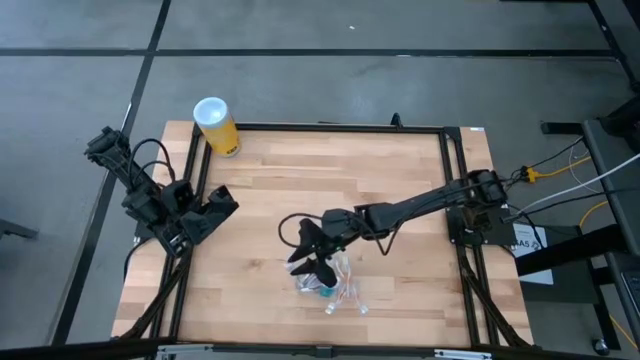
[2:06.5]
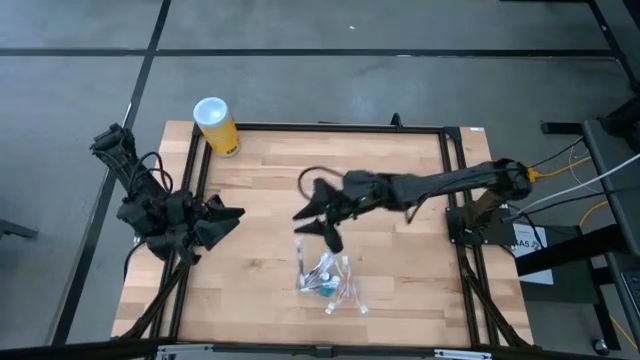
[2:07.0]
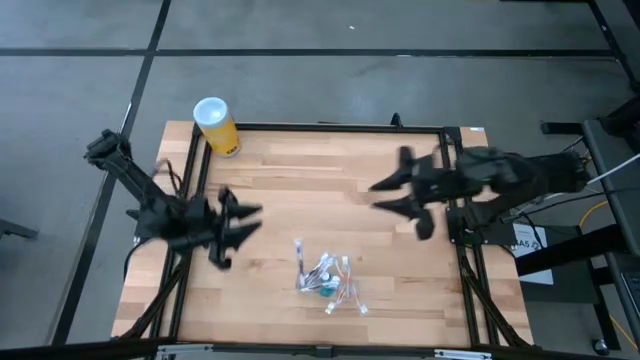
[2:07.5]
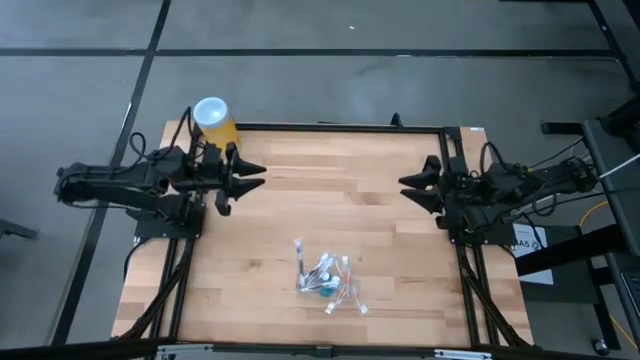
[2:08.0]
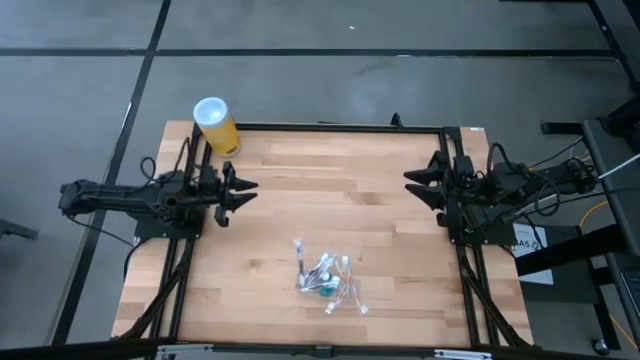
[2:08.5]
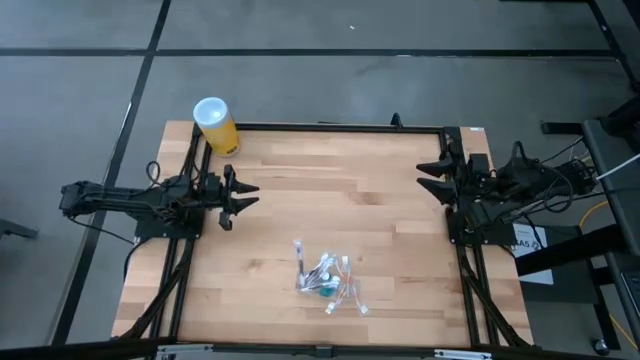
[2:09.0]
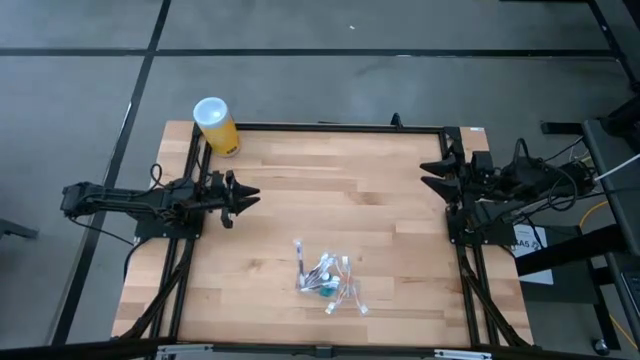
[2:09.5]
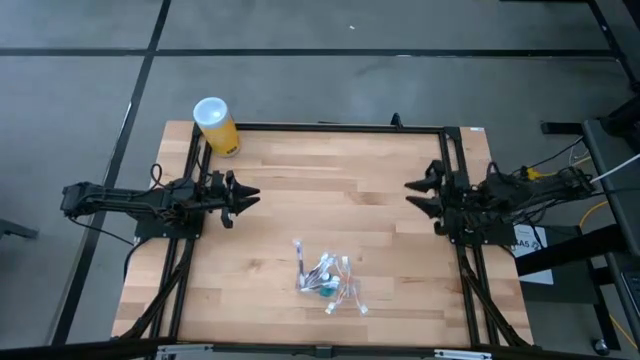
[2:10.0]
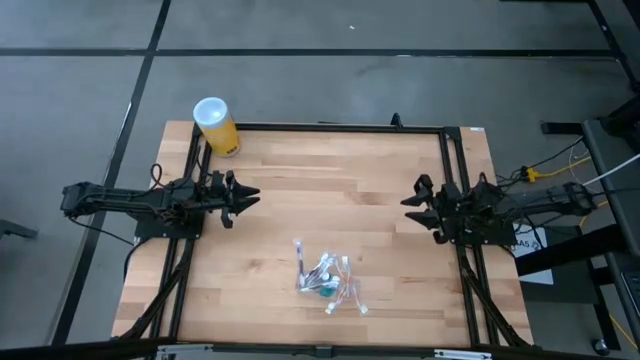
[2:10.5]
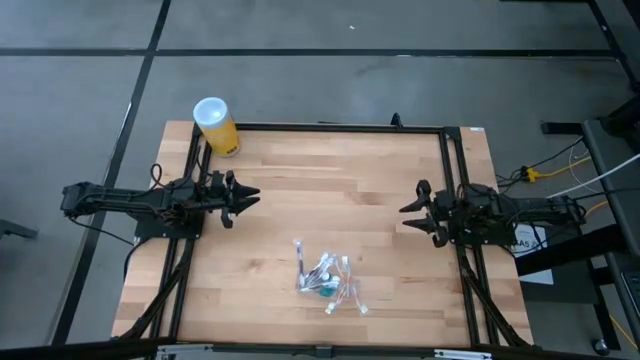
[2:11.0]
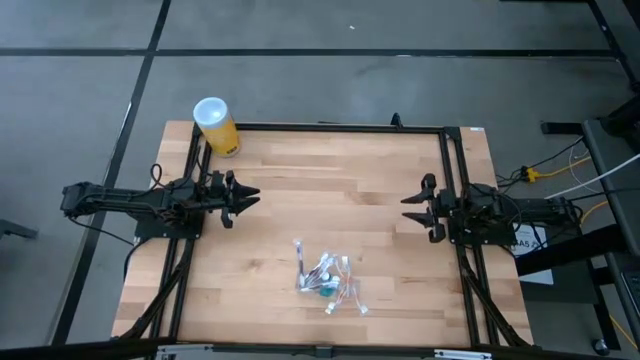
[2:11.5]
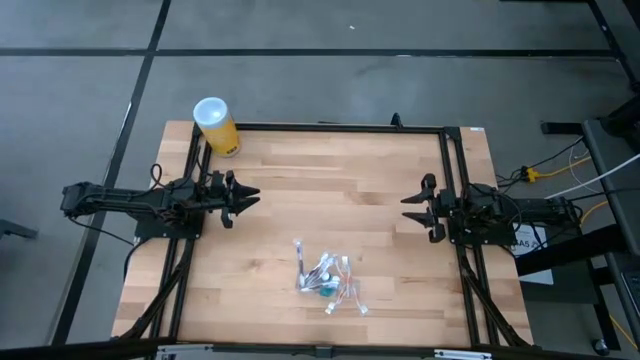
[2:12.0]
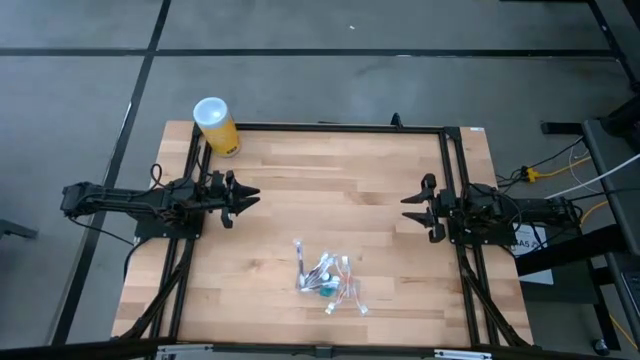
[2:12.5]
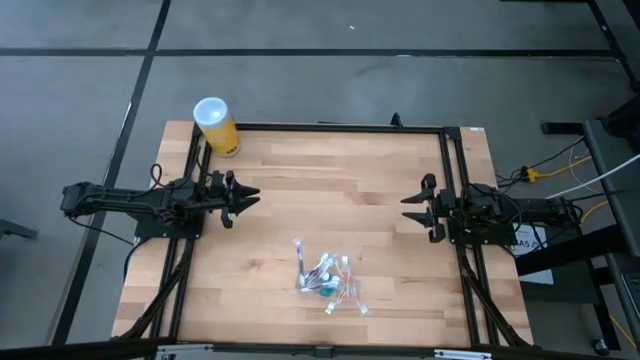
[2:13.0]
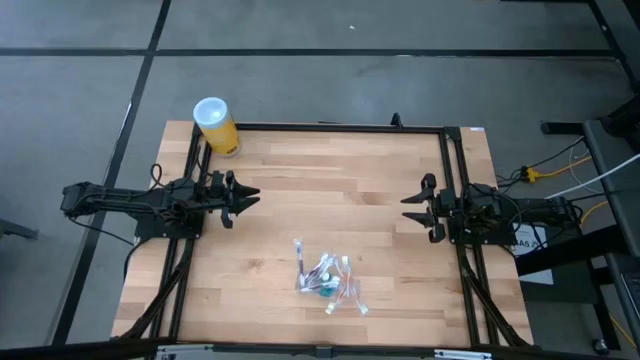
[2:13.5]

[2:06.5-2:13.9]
Task: Pick & Place toothbrushing station
Return to Home Position

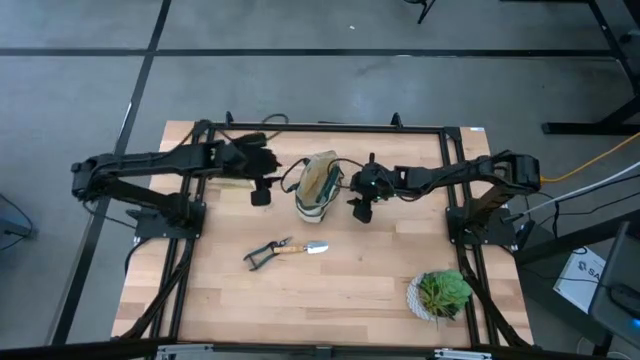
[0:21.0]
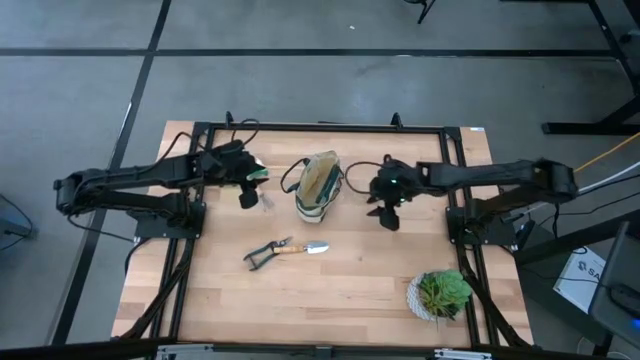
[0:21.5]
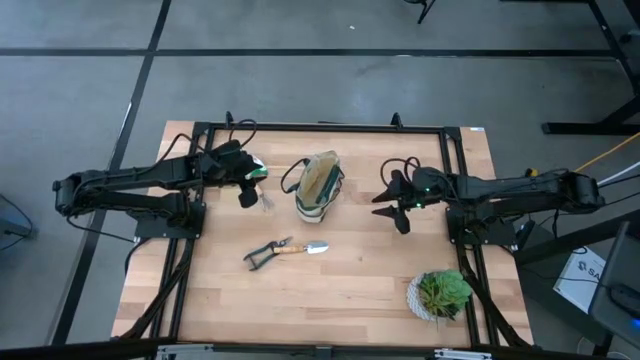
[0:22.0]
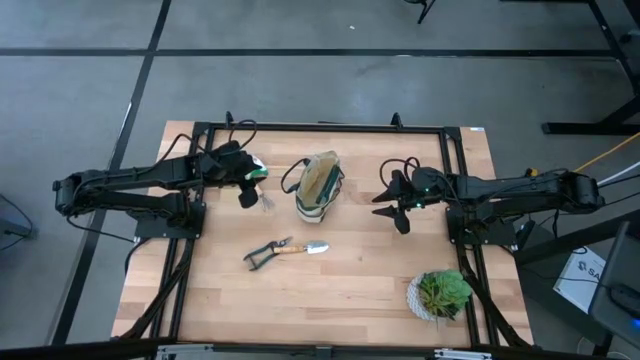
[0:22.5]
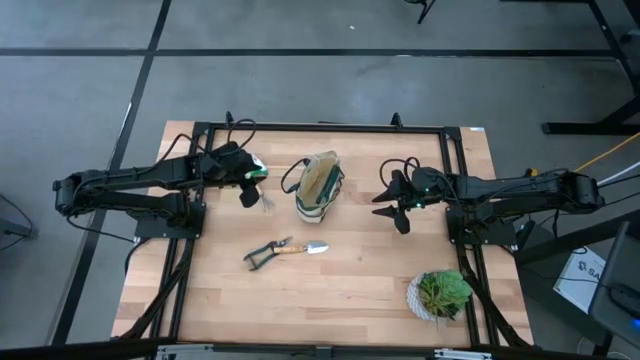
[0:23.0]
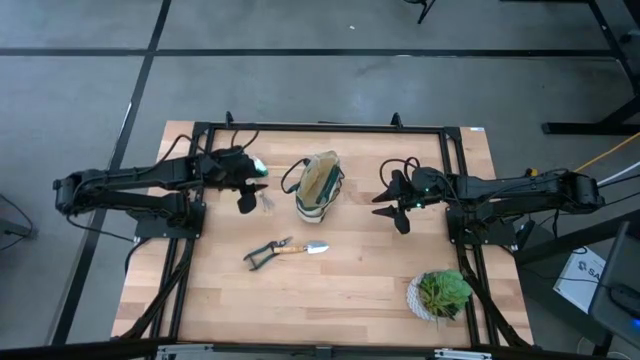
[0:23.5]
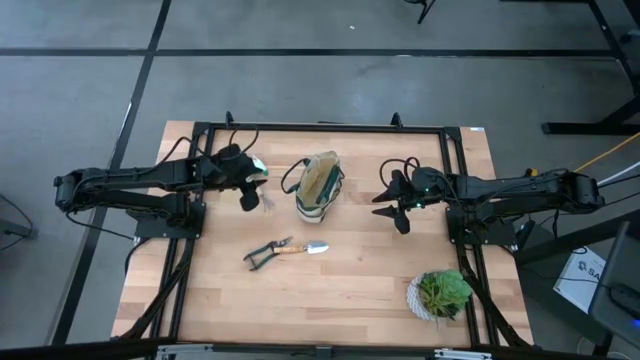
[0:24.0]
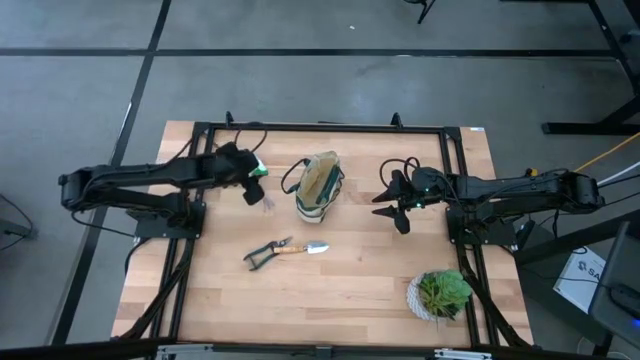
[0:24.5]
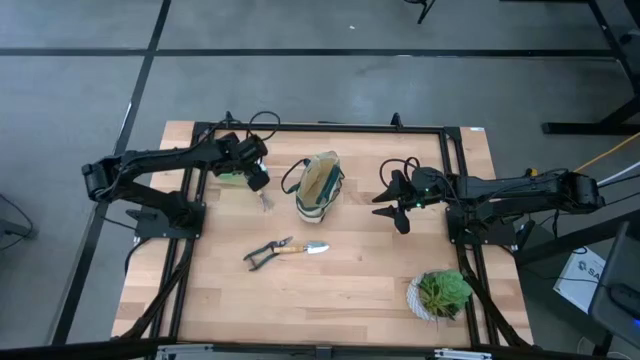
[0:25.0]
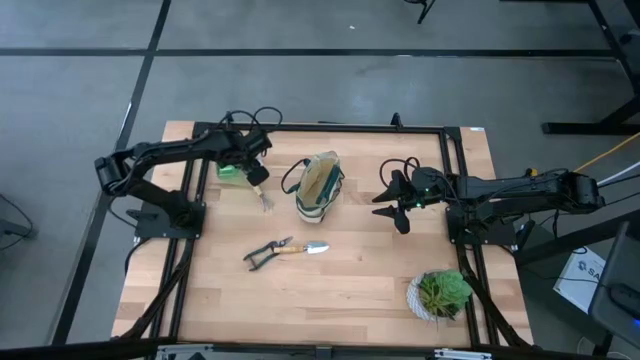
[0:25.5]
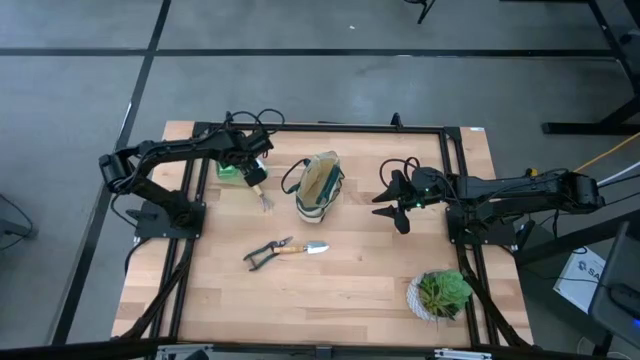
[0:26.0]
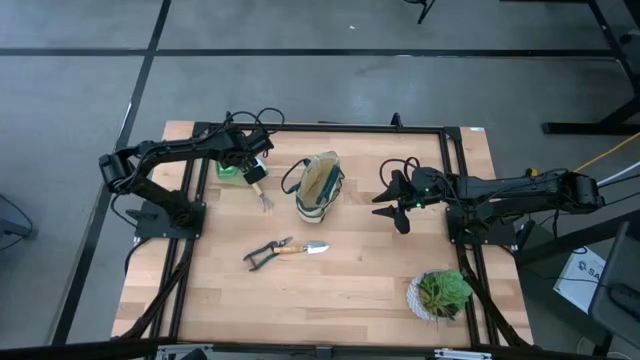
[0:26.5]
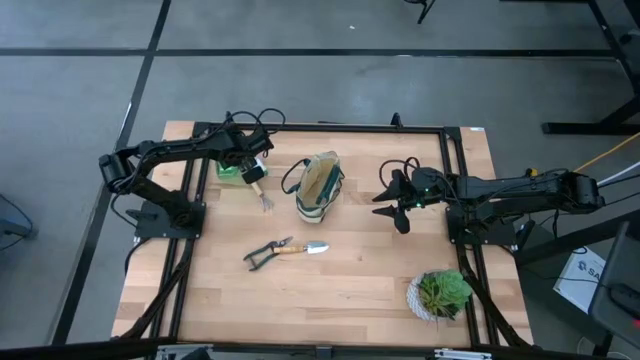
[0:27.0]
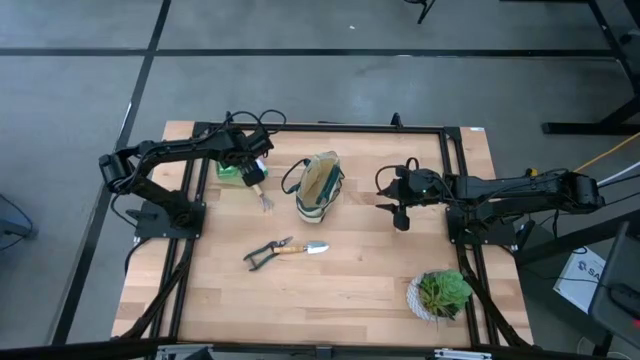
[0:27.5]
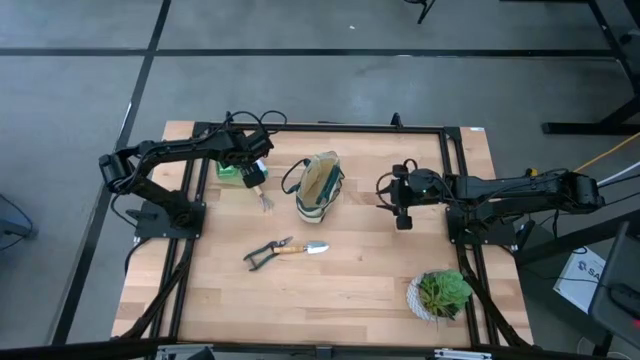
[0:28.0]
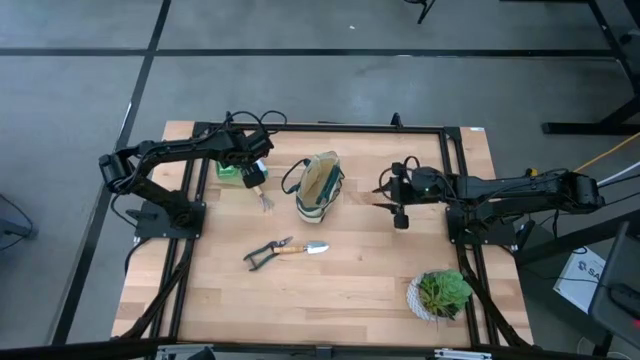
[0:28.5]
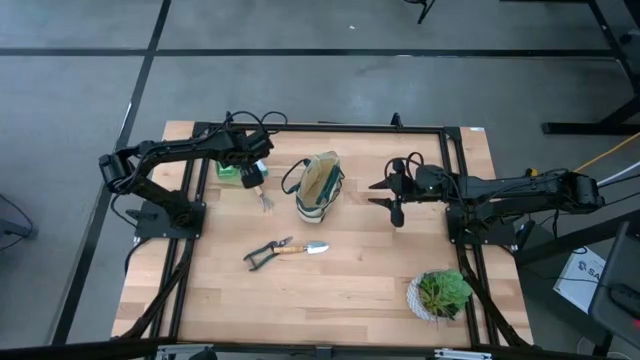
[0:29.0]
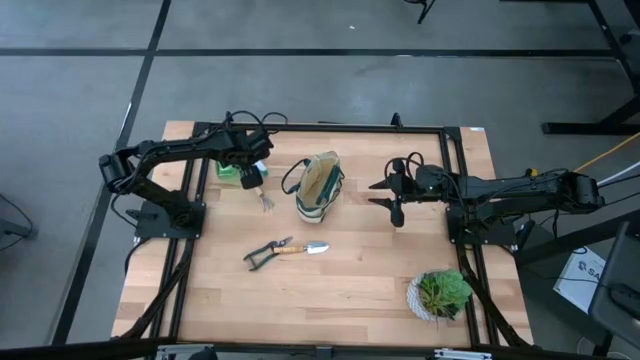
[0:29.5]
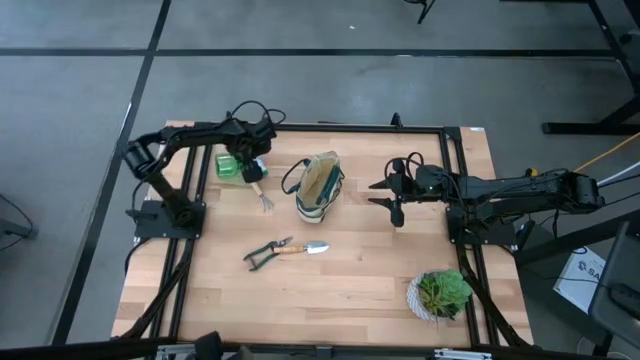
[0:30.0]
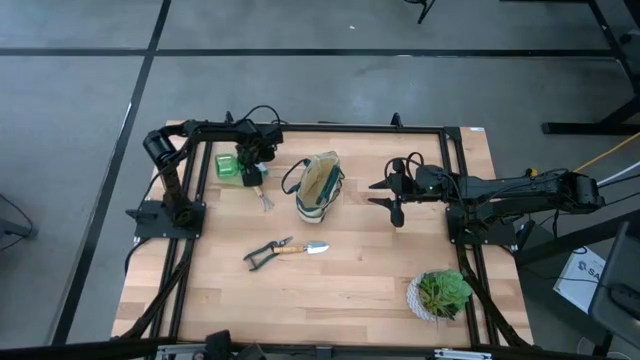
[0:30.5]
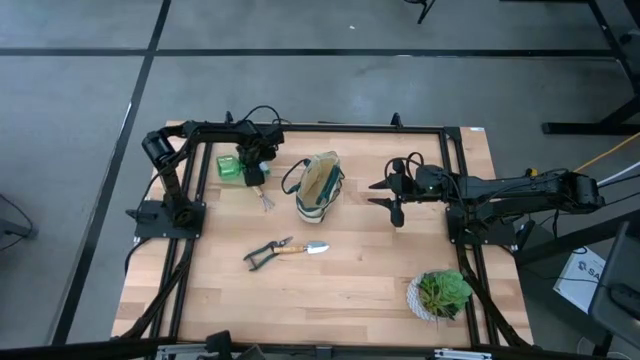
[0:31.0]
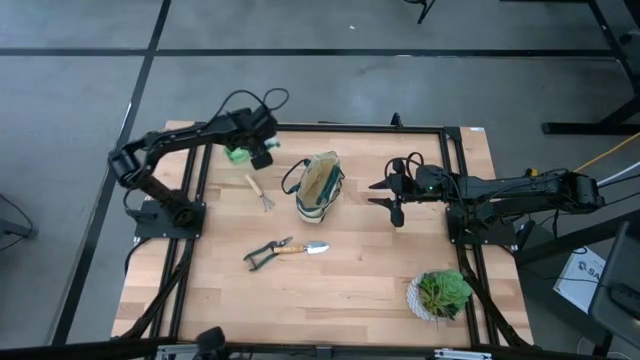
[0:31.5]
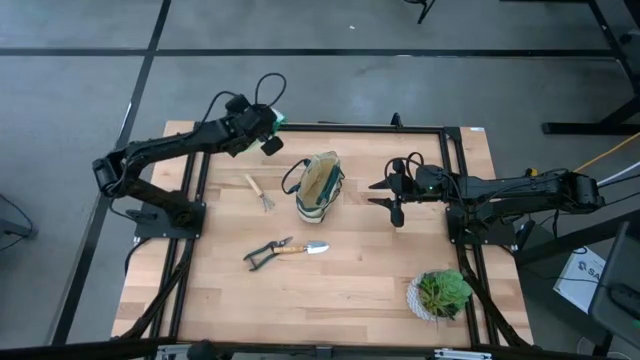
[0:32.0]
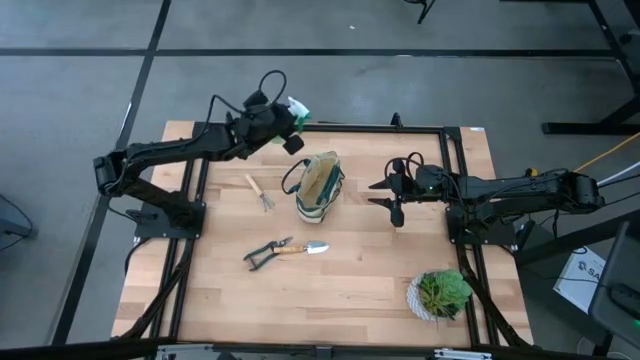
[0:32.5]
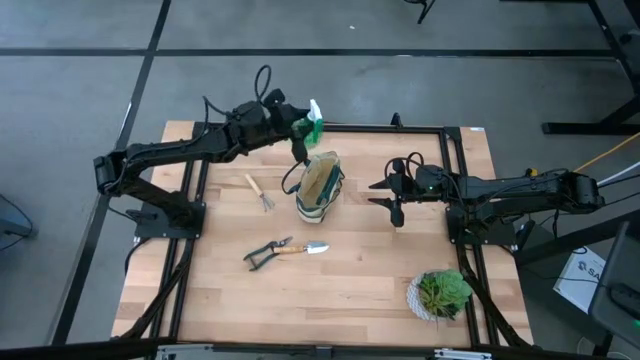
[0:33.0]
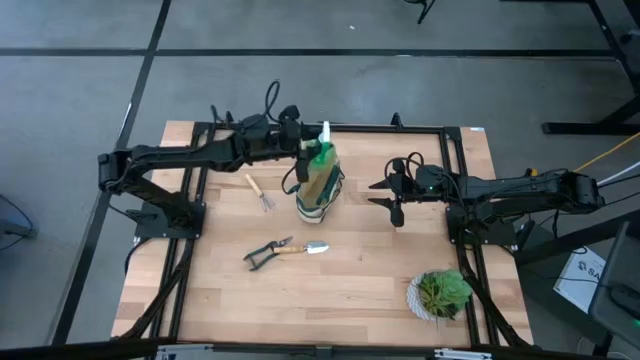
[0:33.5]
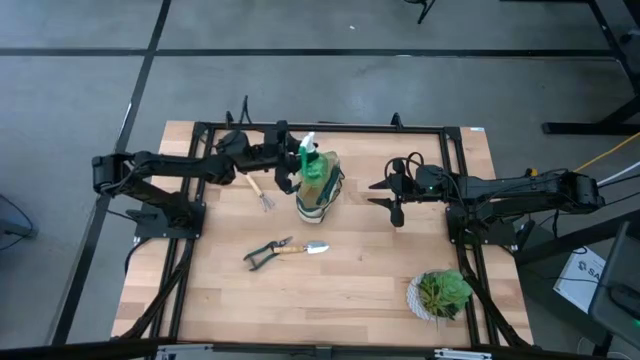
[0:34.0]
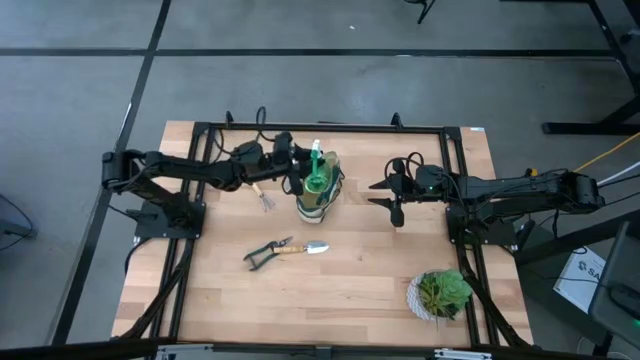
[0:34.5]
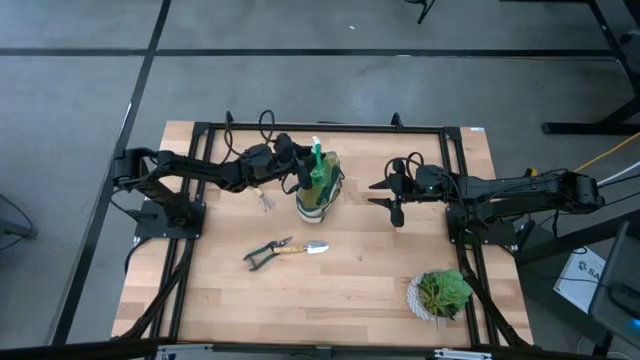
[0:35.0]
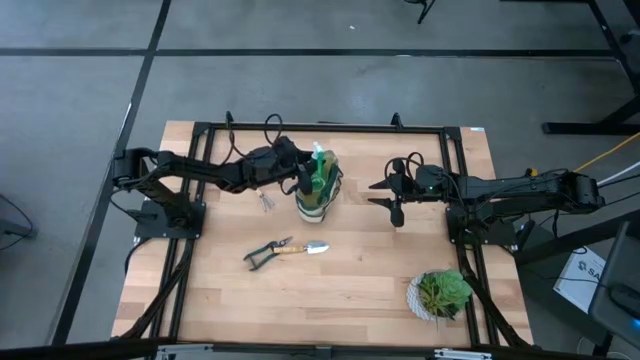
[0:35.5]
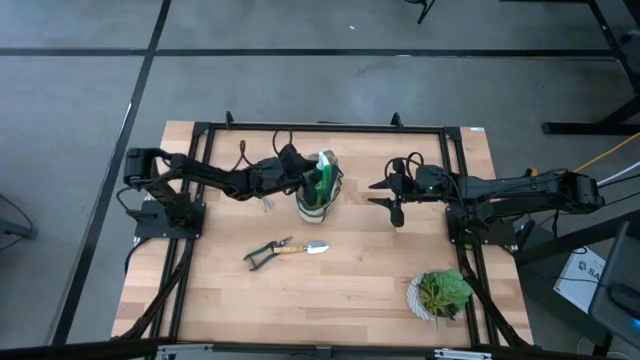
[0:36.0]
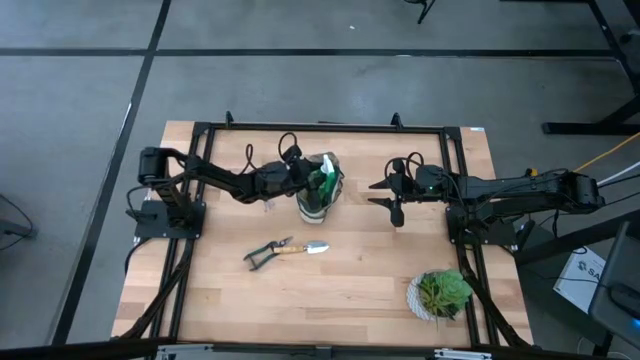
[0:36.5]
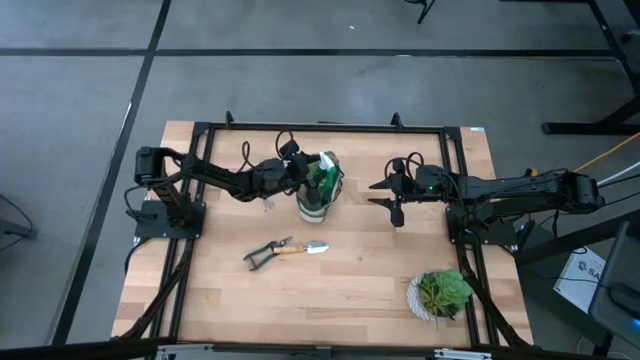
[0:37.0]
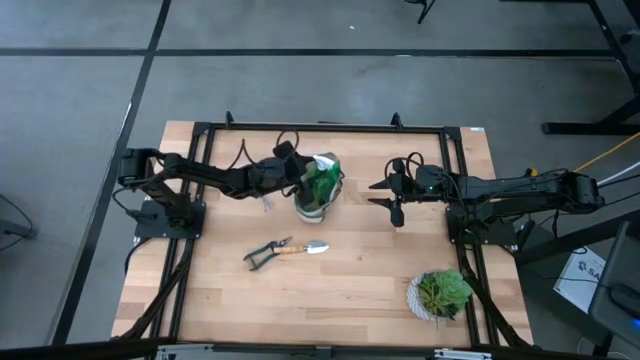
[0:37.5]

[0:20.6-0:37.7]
Task: Pick & Place Garden tools in Gardening bag
Put the green spray bottle into the gardening bag
